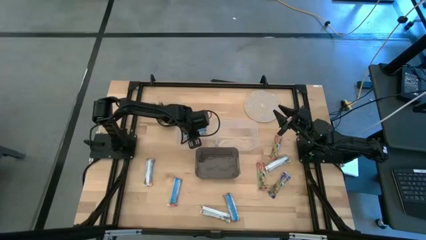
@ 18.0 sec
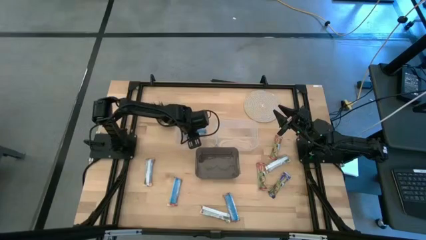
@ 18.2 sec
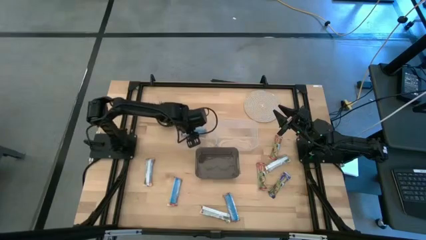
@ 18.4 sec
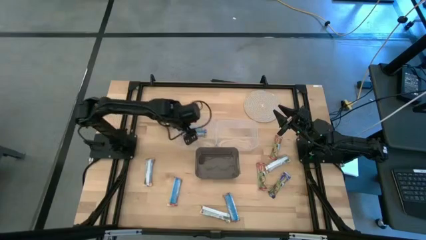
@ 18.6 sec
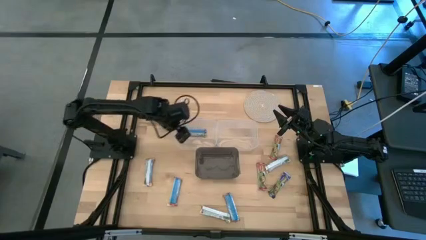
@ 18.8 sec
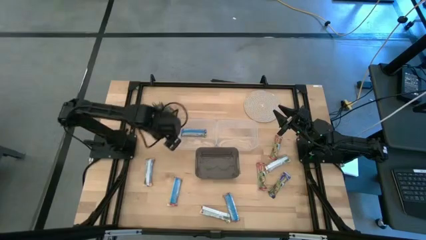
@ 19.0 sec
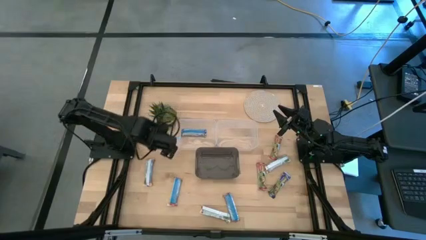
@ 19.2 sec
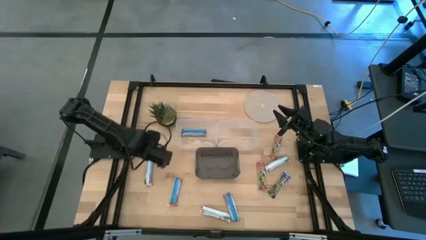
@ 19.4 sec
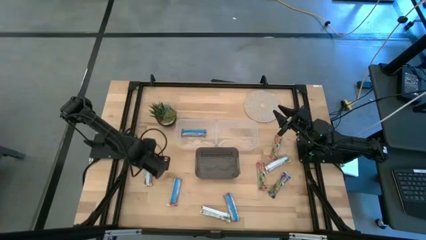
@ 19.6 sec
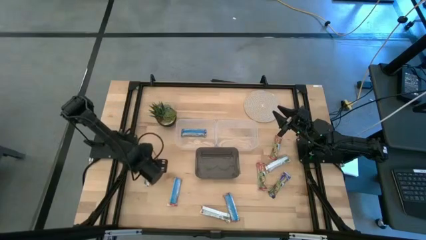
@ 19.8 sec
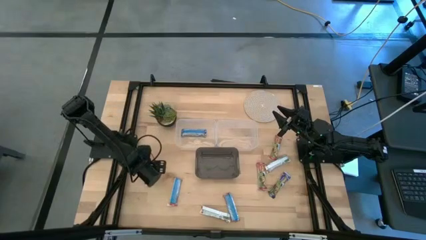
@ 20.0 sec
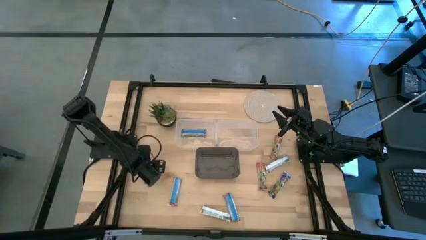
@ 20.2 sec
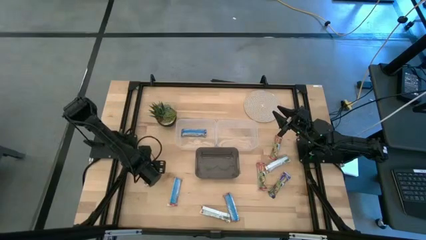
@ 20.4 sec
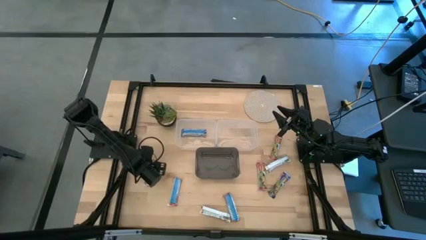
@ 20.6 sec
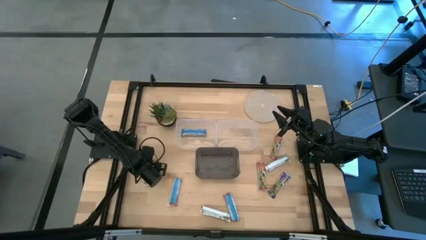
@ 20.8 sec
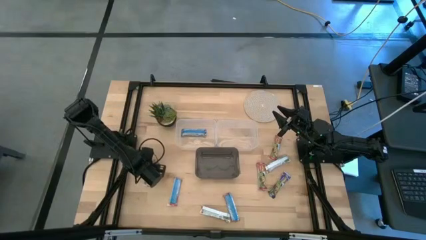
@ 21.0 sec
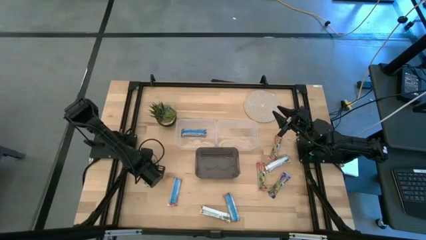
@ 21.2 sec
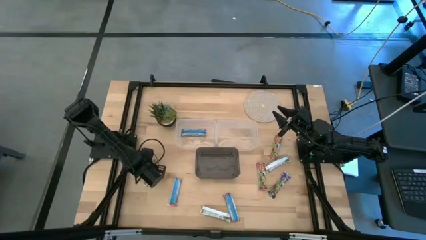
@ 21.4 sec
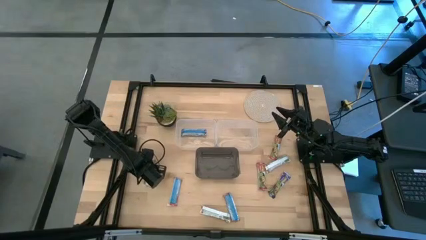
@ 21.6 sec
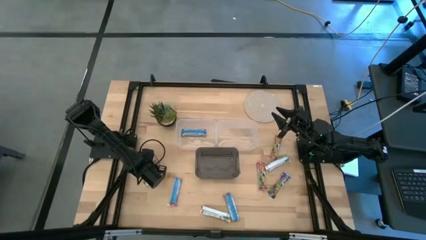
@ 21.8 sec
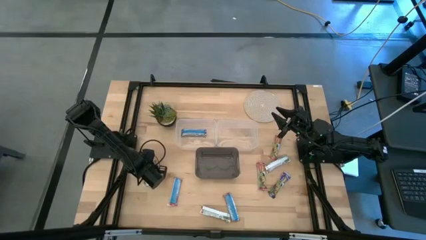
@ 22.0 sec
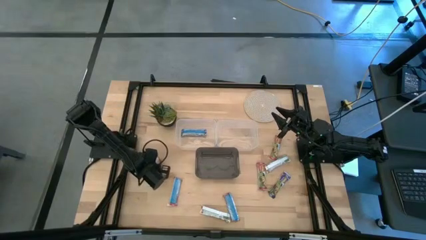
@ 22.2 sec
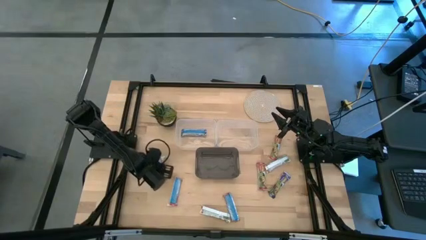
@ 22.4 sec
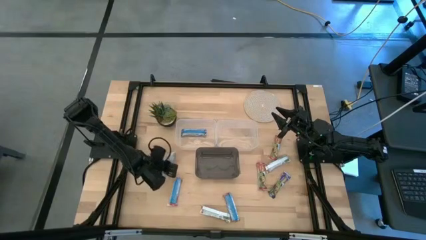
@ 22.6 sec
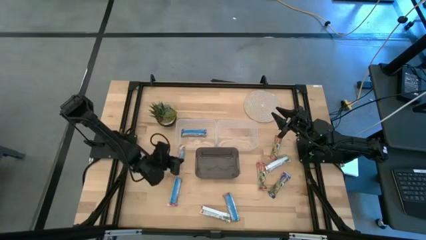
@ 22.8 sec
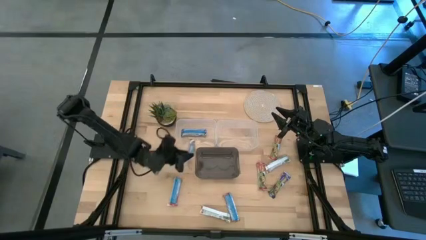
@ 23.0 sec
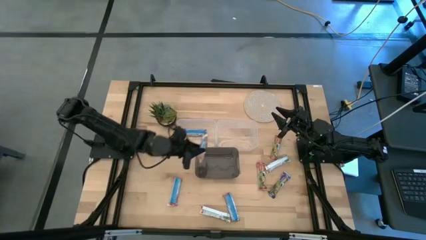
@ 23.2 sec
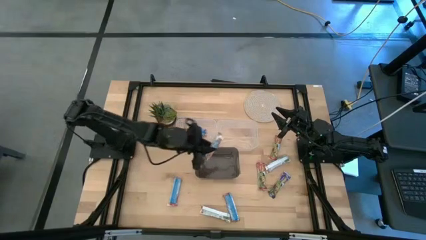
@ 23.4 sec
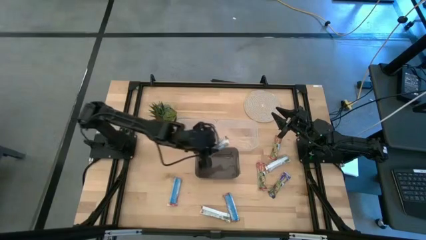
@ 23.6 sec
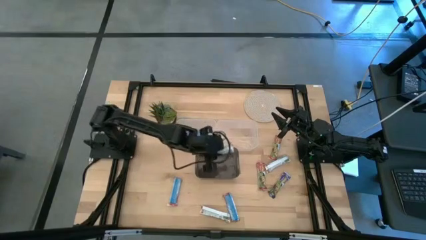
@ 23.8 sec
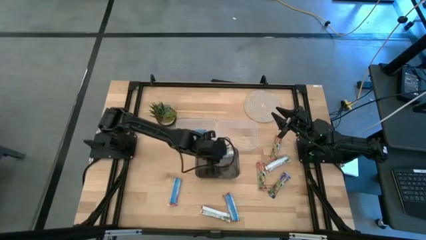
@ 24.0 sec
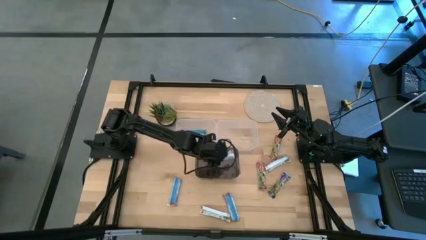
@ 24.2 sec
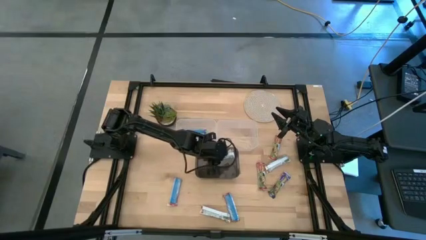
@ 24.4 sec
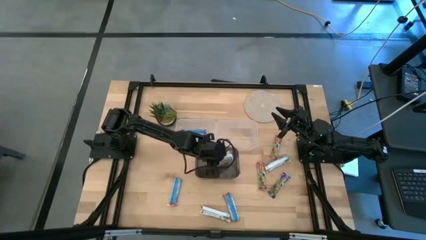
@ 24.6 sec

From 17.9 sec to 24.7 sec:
Task: Pick and place Granola Bars by type
Put the yellow granola bar into the black bin

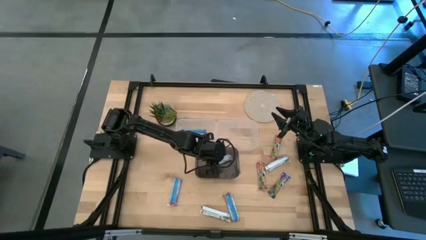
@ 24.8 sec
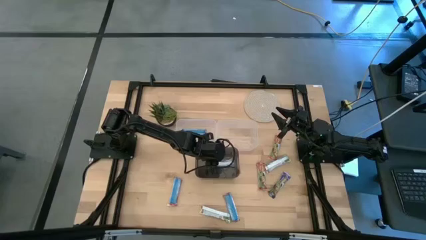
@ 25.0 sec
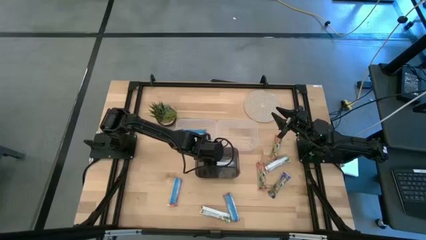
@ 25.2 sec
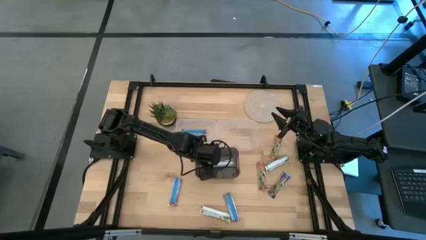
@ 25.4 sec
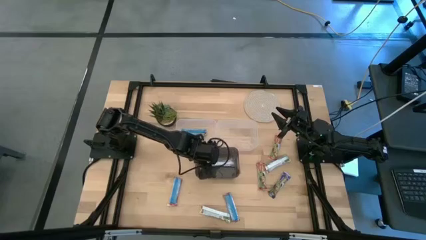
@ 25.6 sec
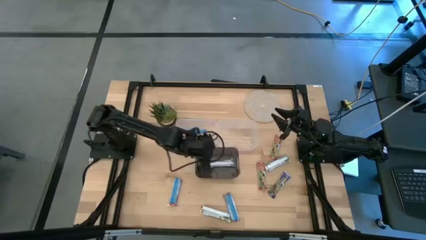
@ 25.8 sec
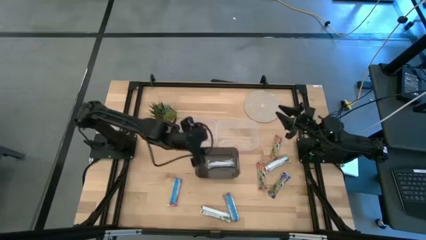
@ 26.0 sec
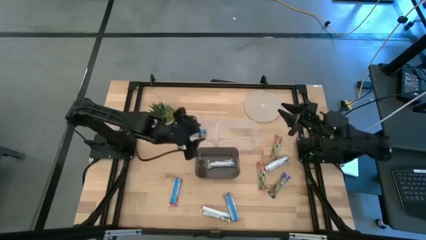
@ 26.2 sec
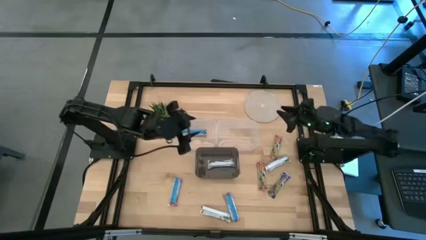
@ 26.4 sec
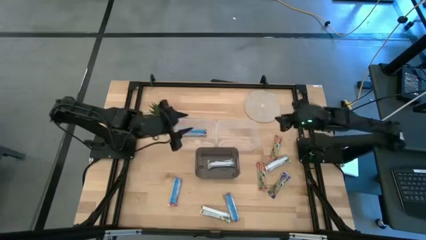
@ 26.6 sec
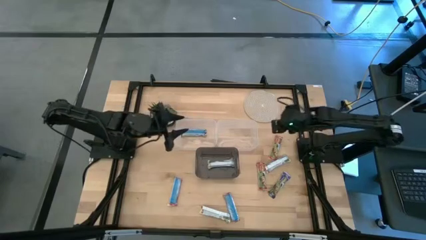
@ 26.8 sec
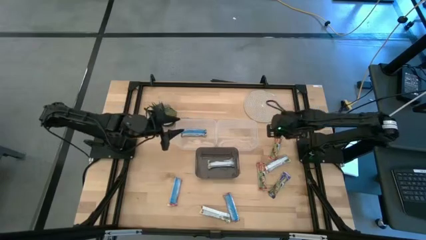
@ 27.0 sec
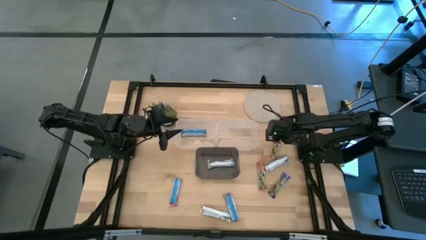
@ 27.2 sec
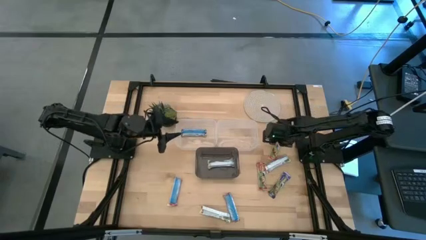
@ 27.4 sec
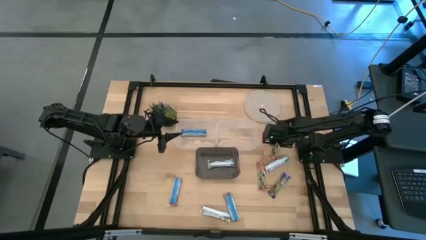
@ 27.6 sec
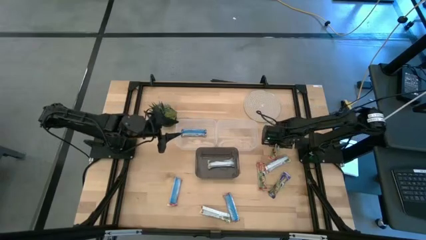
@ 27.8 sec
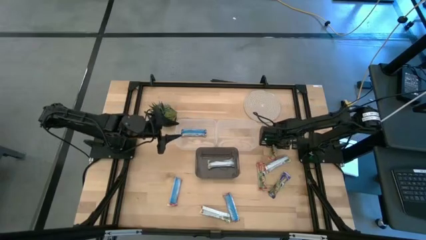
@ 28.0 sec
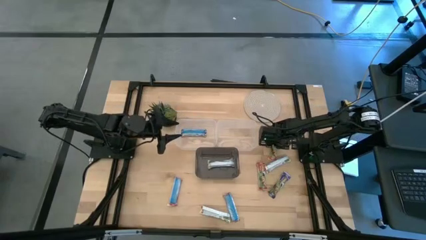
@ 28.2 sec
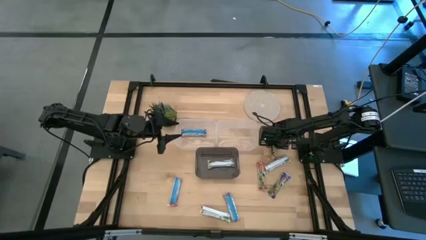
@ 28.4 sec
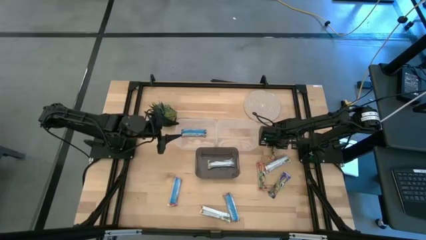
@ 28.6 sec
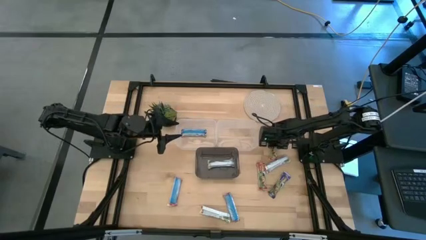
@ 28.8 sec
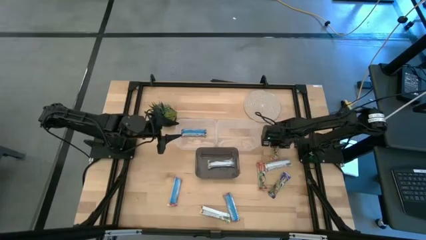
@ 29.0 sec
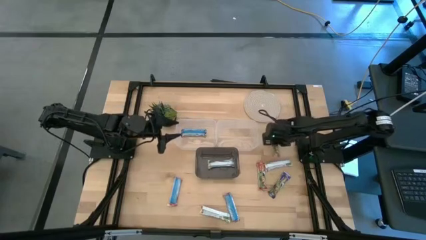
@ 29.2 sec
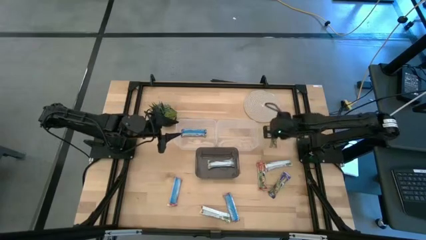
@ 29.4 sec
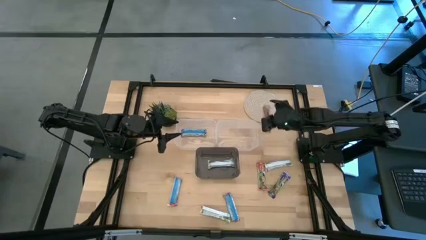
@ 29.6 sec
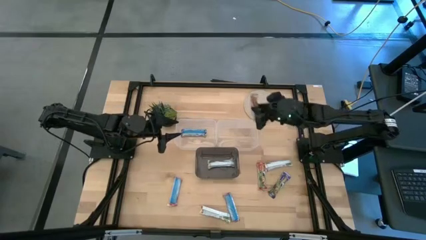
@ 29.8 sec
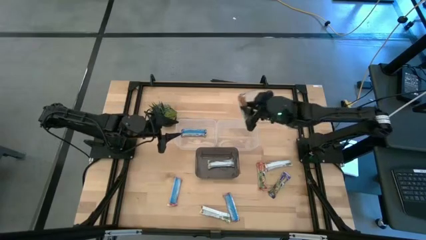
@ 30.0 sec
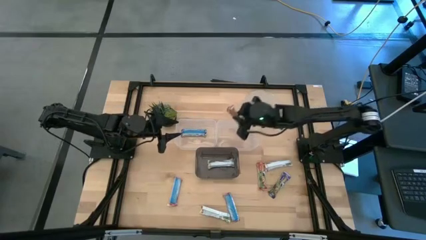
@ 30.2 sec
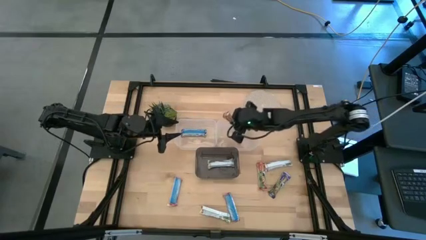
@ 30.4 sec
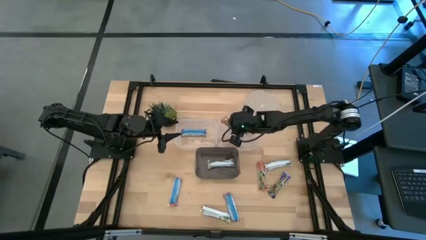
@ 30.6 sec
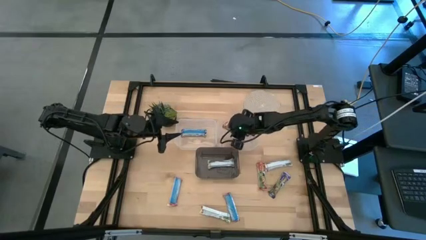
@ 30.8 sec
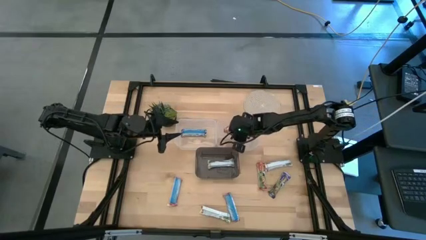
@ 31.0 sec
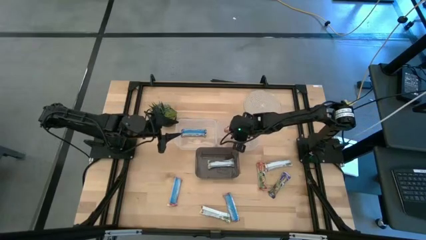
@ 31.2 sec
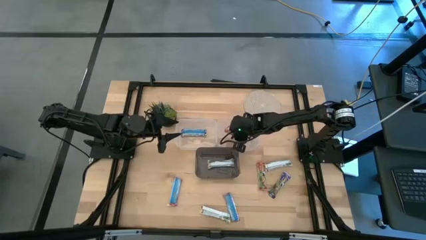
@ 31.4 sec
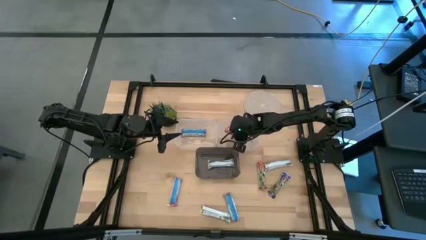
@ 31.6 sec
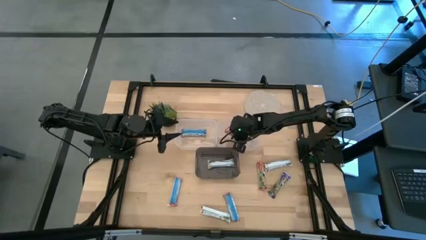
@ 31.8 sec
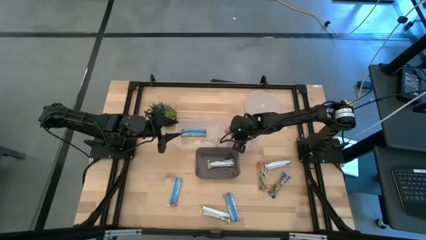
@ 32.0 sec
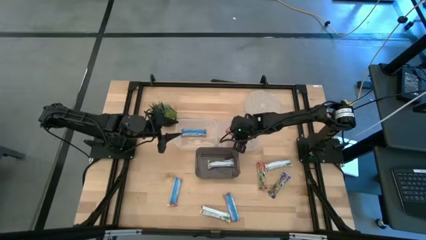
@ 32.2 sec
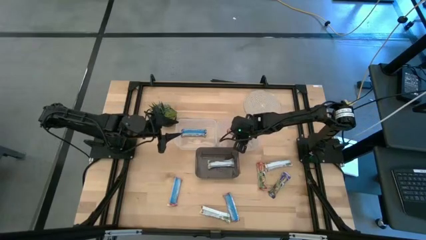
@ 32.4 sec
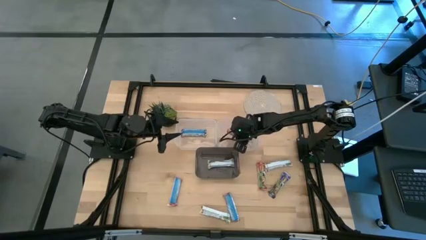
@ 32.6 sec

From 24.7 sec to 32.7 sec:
Put the red granola bar into the right transparent bin
